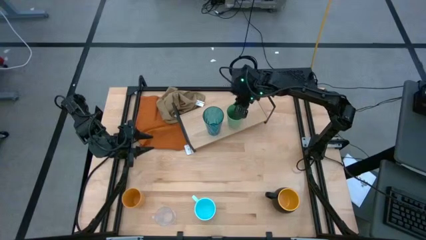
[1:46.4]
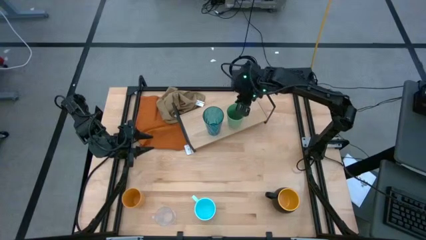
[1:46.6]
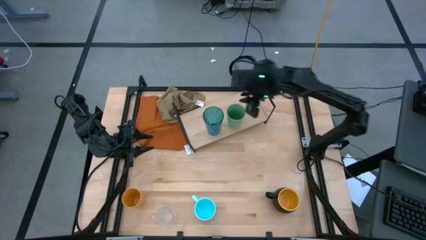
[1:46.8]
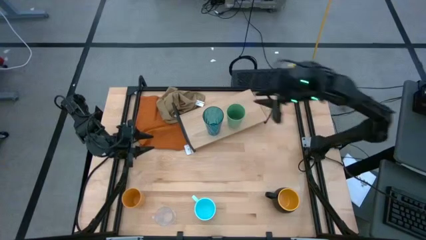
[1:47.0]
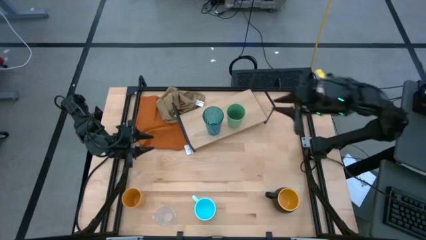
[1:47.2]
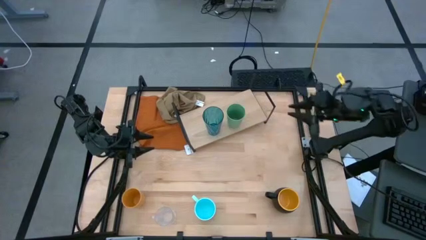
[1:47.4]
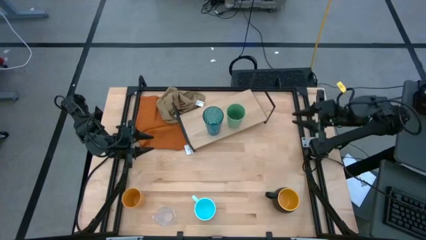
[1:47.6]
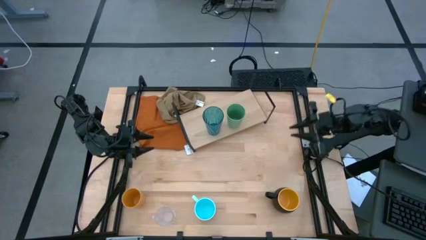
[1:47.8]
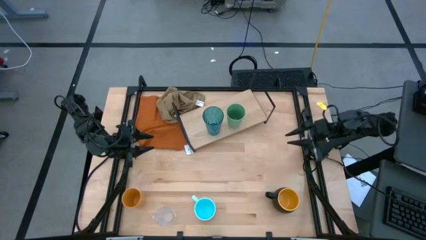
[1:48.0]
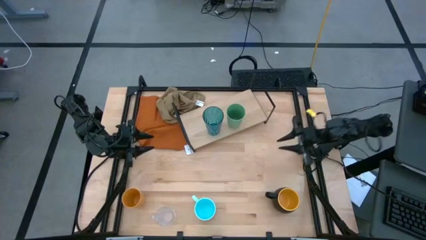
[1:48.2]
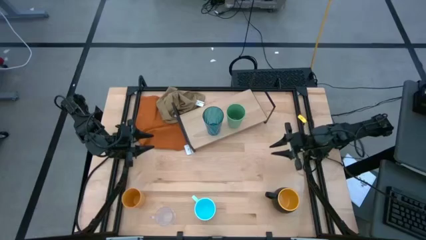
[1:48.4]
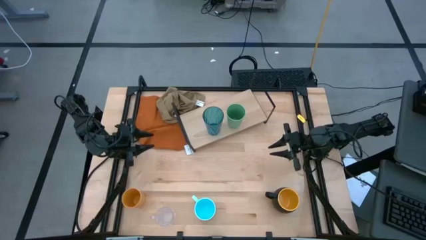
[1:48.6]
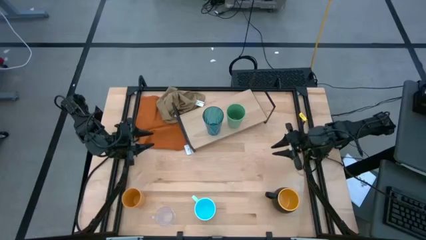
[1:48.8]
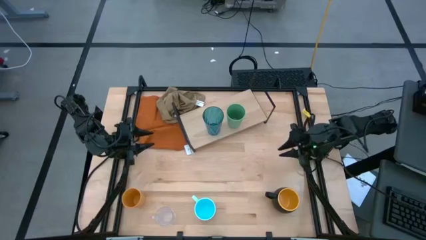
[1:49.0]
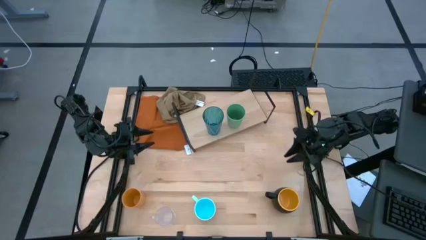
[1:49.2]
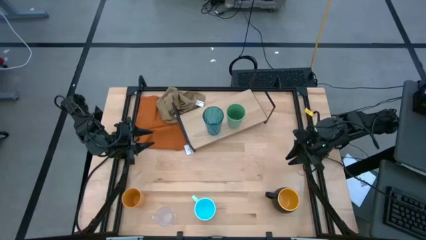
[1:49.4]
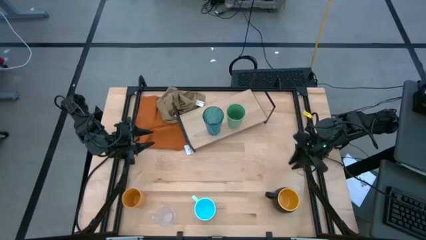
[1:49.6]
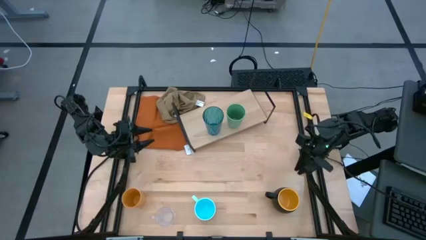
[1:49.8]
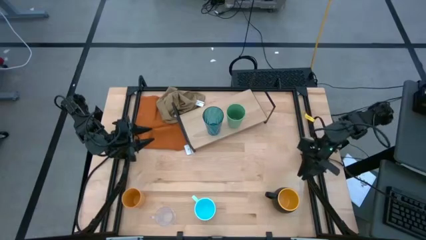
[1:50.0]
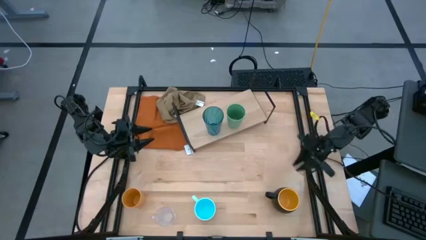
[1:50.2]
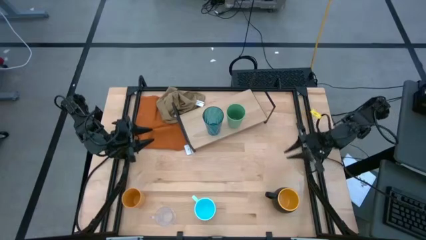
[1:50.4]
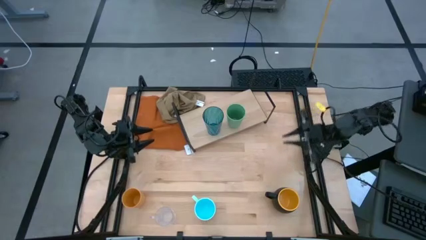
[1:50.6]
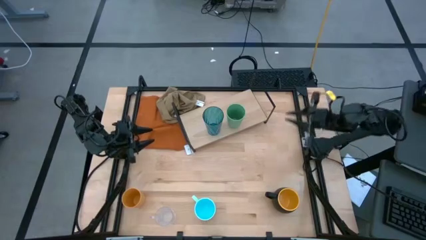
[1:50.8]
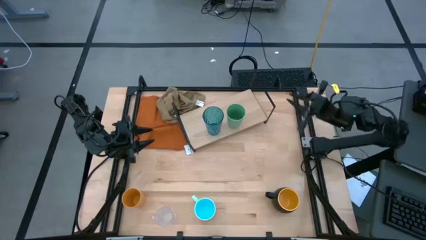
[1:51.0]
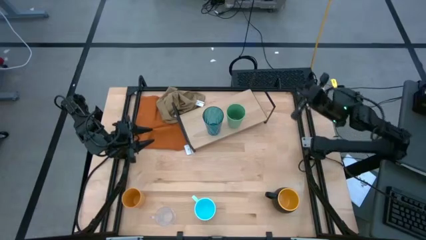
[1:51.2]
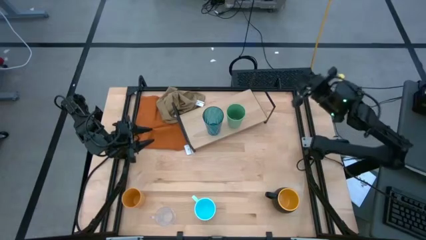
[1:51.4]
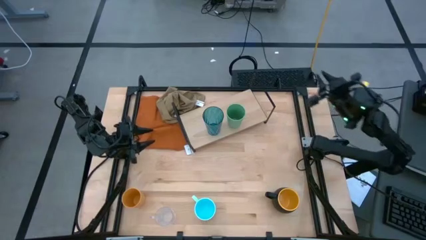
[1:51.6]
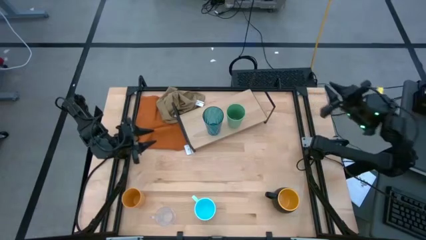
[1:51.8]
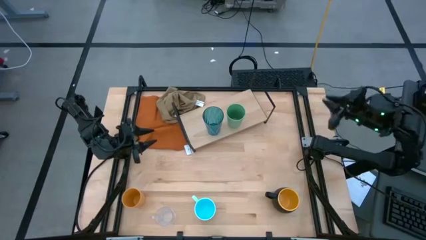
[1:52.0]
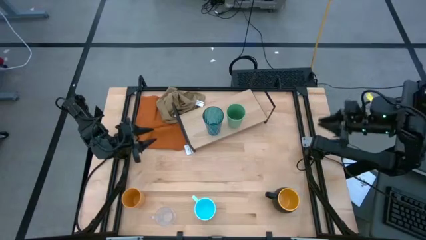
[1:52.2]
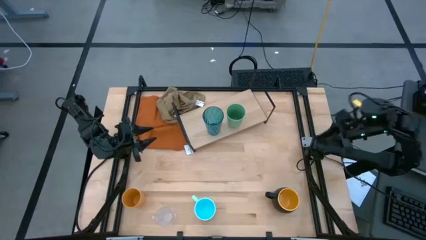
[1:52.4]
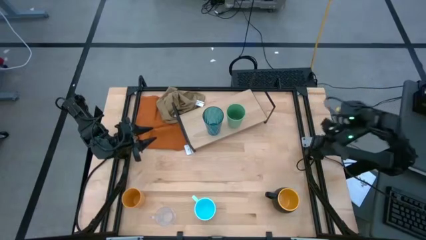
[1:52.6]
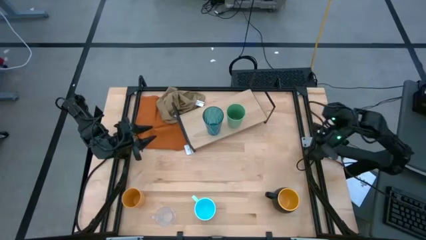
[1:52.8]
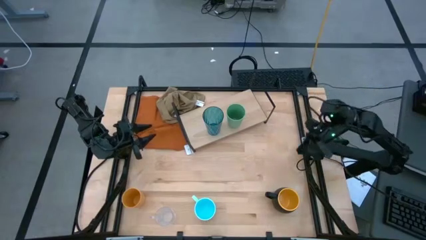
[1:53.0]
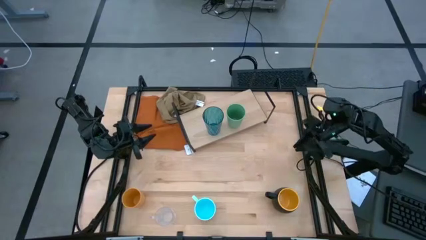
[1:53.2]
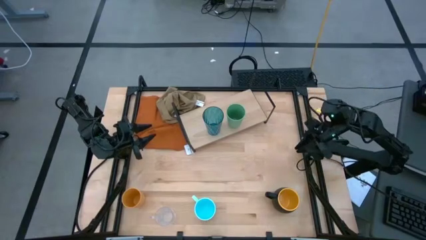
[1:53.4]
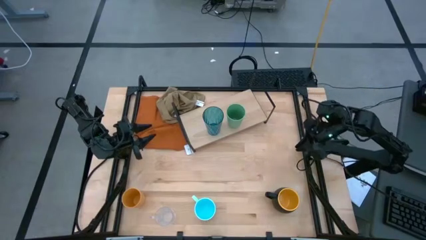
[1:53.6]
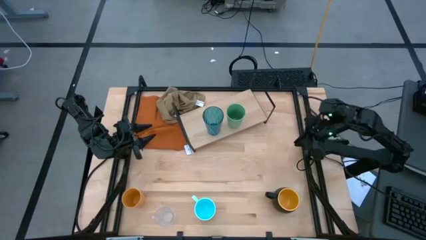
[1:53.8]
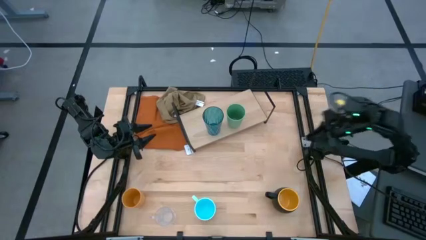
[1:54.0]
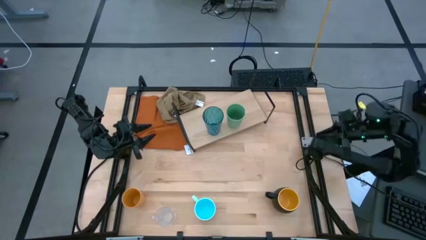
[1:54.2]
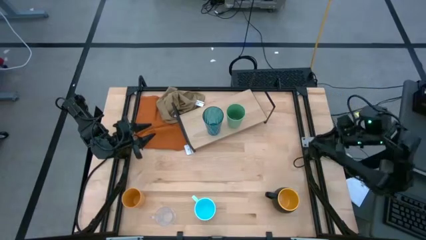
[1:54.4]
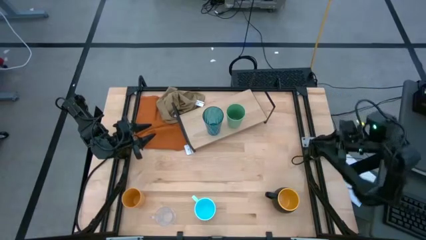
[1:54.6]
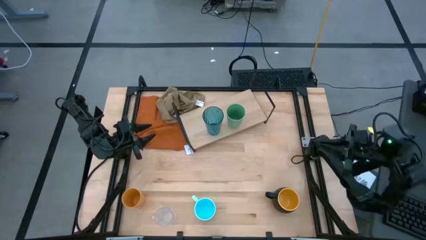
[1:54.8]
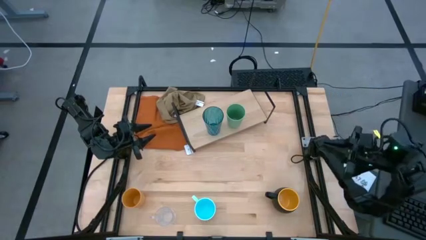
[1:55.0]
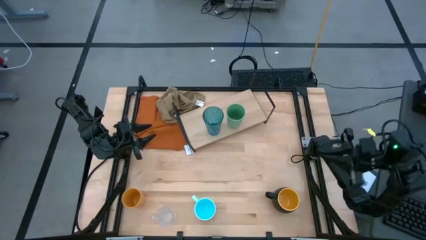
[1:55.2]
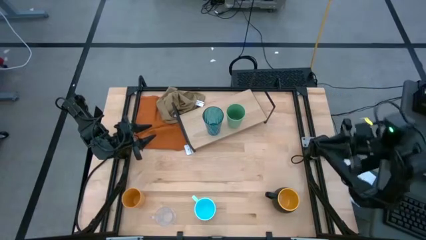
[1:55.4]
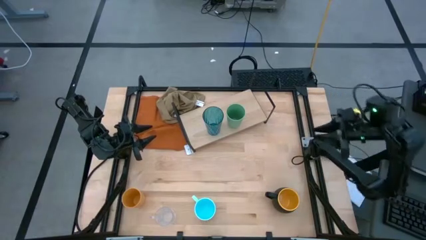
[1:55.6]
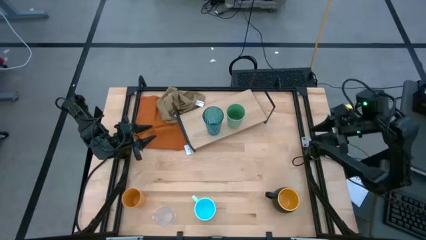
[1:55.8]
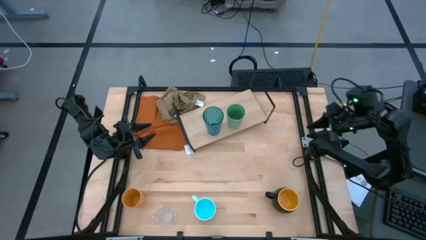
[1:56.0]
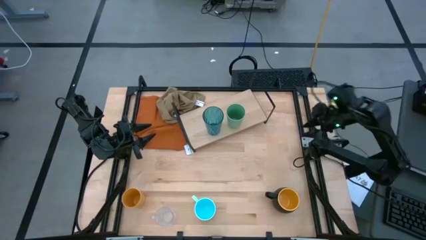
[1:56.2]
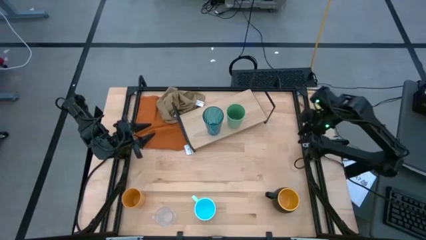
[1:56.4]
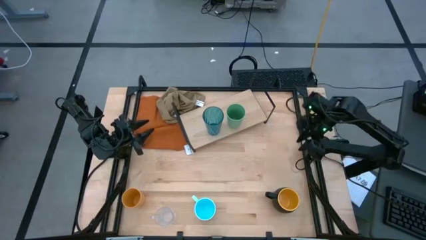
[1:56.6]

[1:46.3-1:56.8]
Task: Stack small to large cups/mugs on shelf
Put the black mug on the shelf
